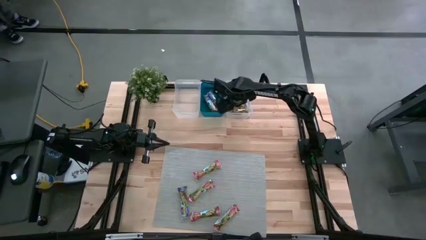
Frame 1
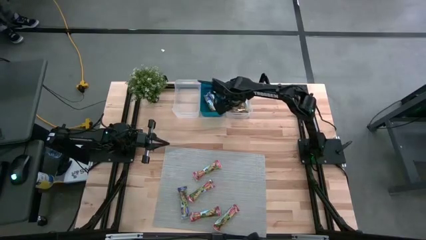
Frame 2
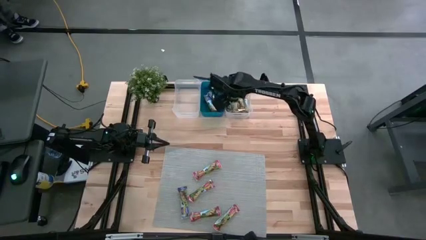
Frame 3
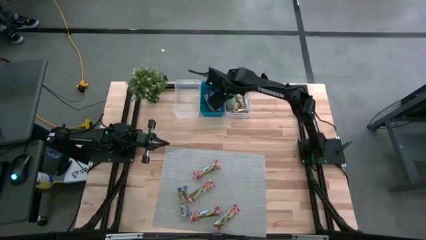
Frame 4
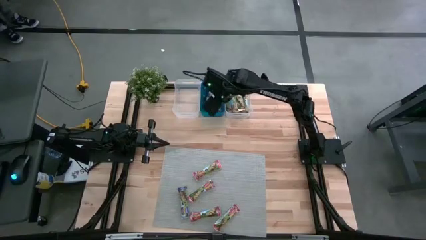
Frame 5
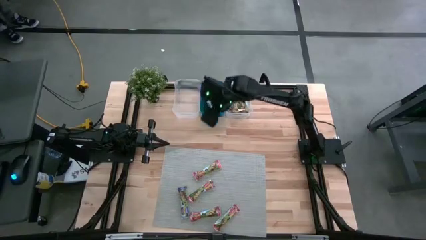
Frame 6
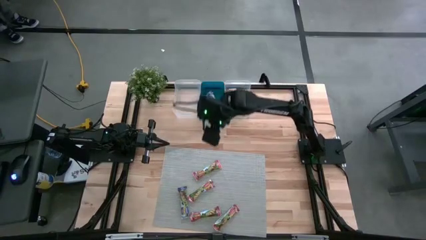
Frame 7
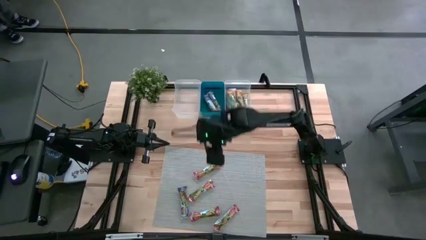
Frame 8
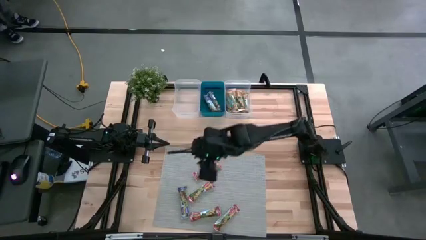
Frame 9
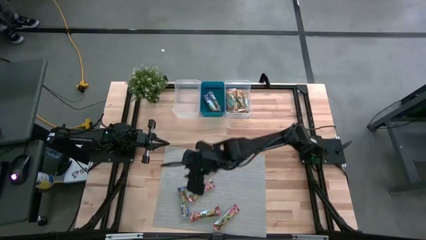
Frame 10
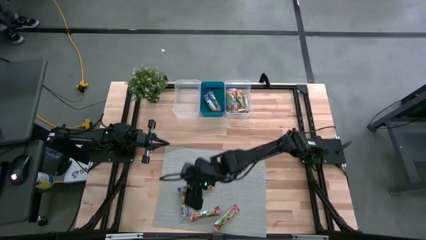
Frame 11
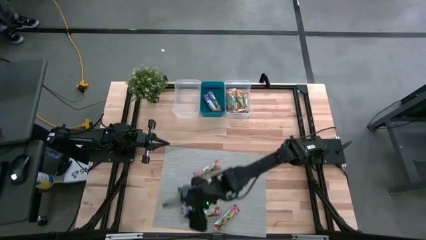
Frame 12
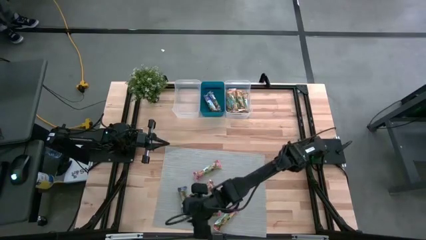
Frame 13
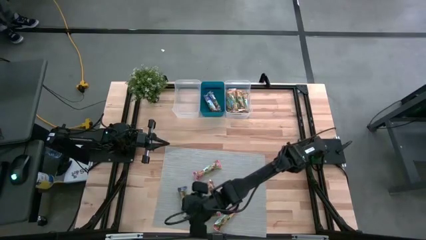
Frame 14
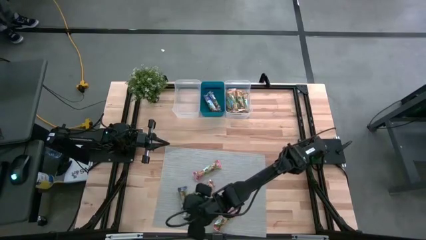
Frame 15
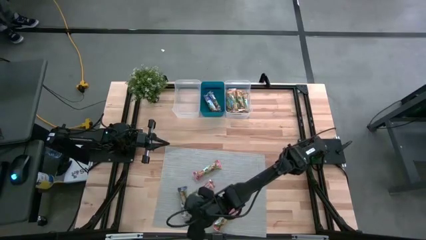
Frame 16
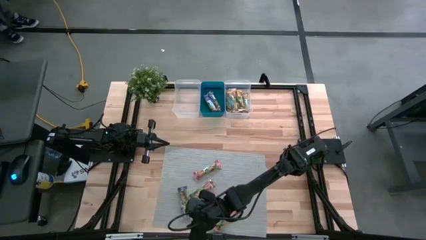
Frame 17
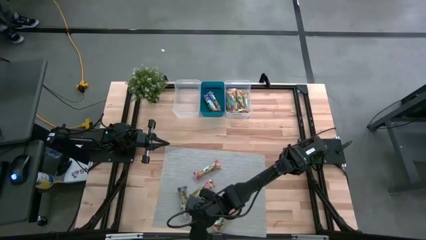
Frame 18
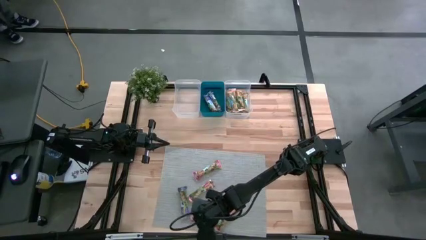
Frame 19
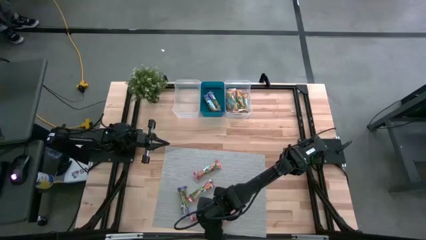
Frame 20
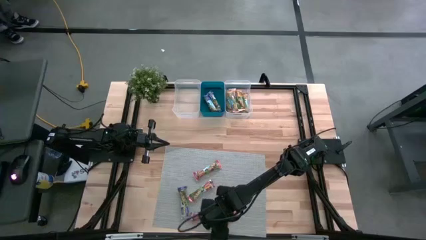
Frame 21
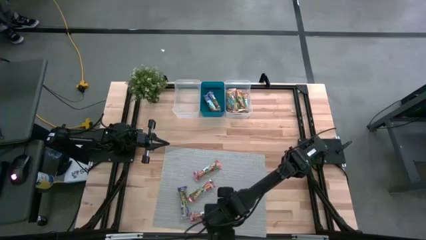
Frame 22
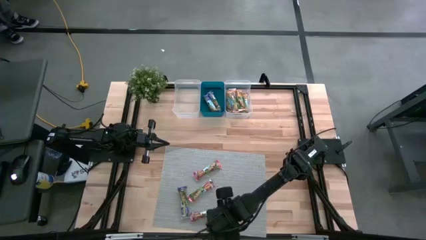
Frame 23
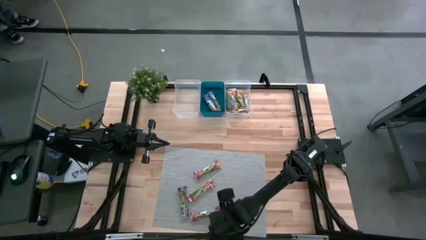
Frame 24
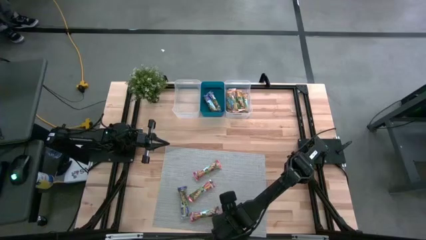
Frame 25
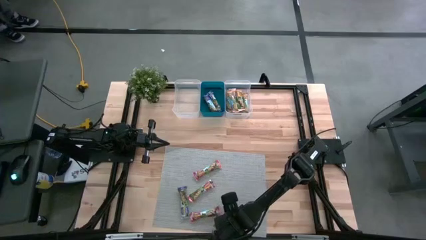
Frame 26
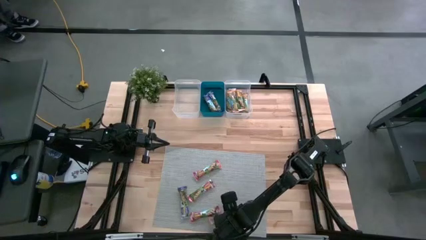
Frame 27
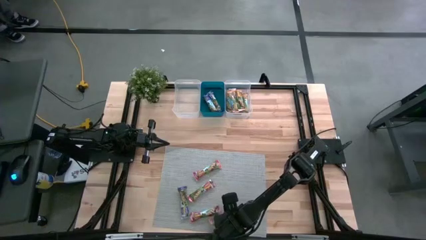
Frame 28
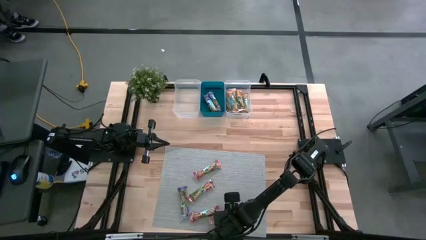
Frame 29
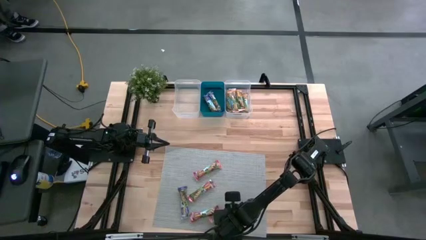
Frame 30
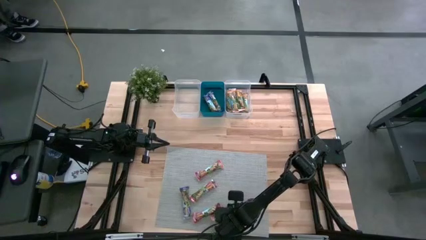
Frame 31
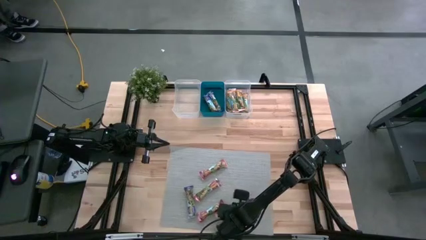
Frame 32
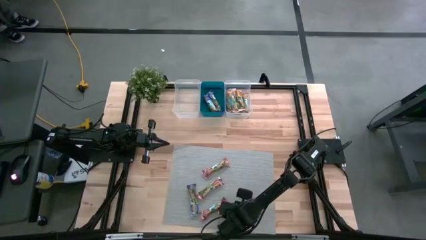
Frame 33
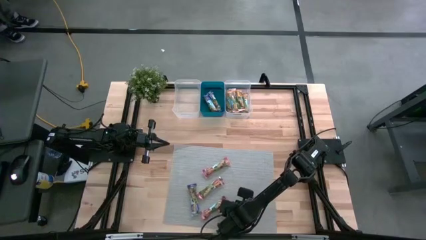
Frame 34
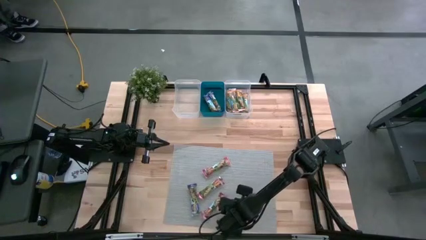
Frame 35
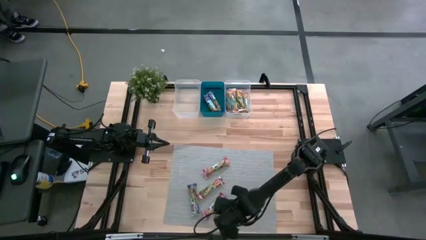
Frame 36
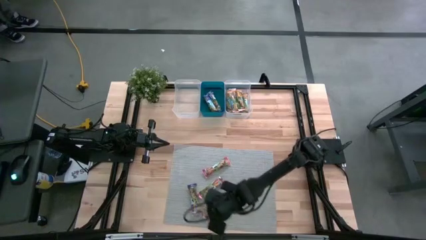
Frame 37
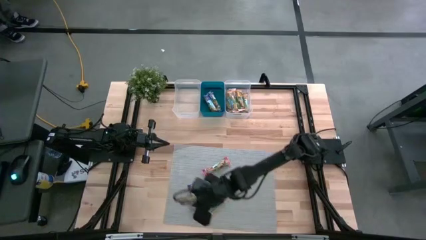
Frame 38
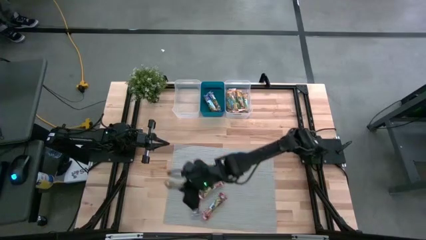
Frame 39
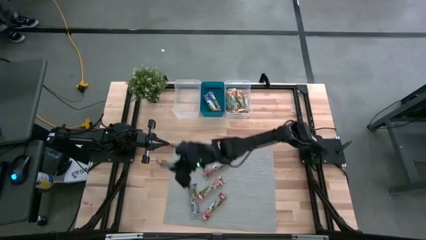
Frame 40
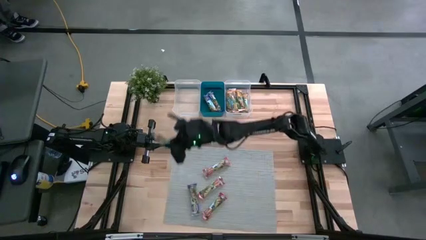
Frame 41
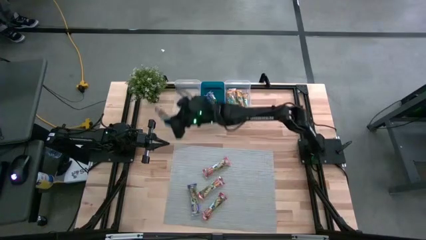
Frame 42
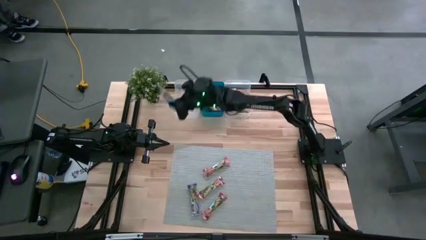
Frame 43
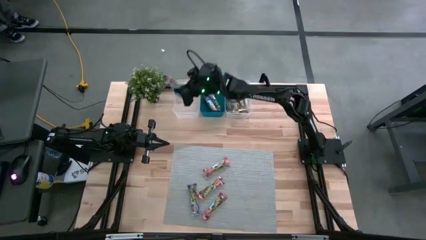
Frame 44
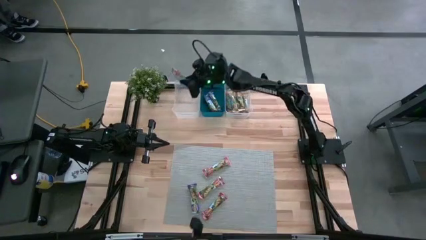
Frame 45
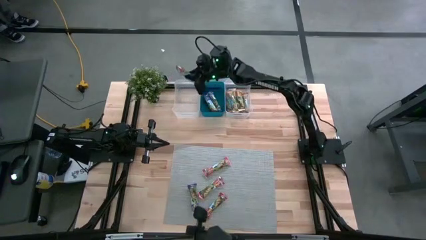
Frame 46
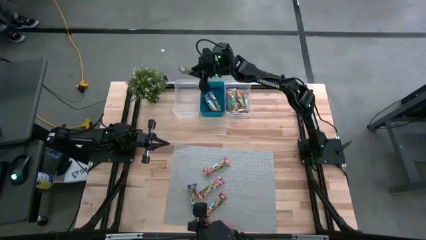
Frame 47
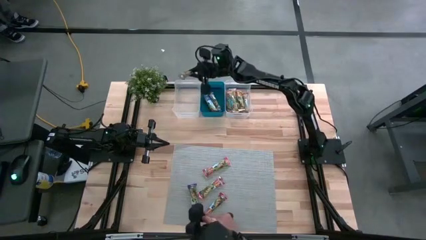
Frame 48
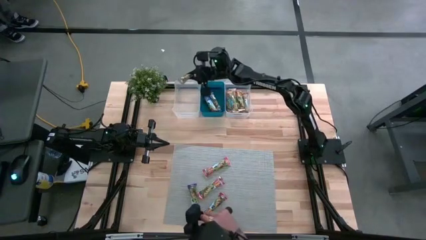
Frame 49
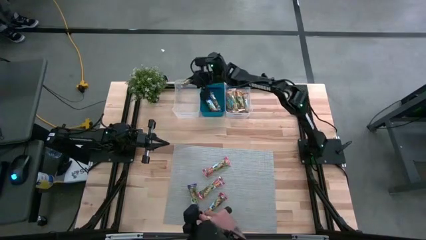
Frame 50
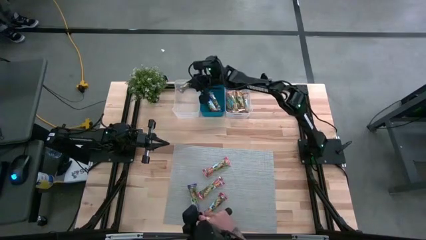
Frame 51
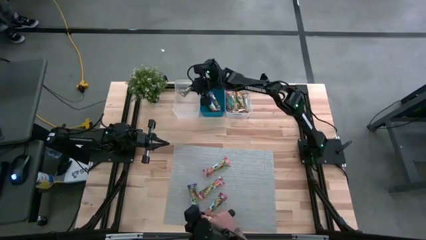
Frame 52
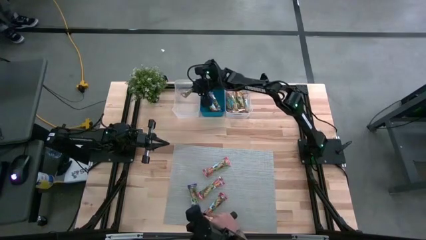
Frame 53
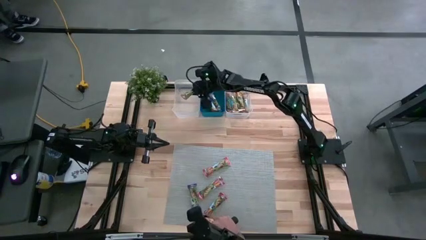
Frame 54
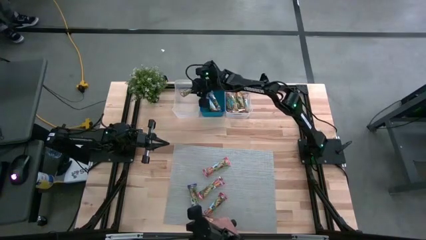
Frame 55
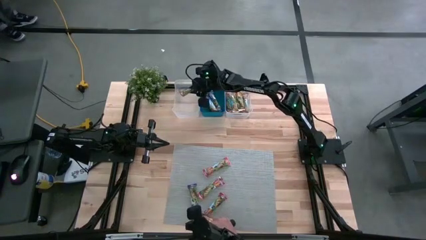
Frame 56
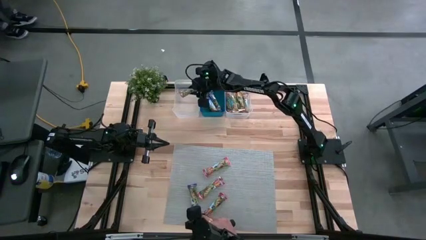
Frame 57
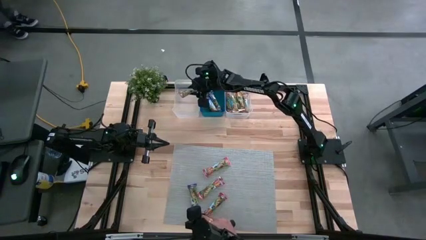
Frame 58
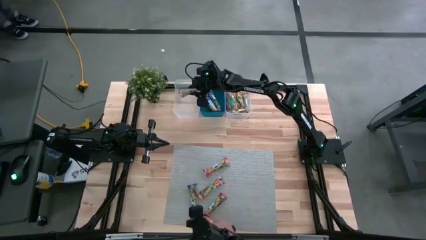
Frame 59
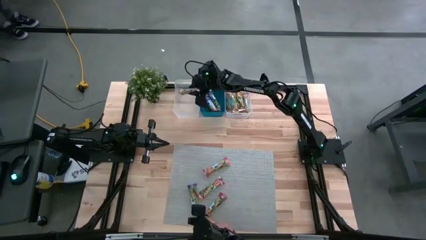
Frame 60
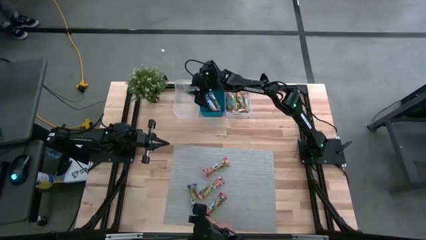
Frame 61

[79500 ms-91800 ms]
Task: Pick and place Granola Bars by type
Put the red granola bar into the left transparent bin

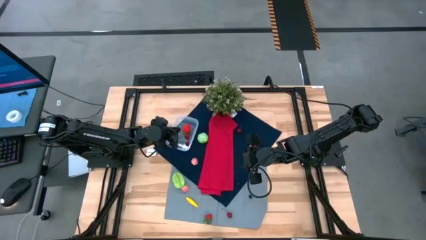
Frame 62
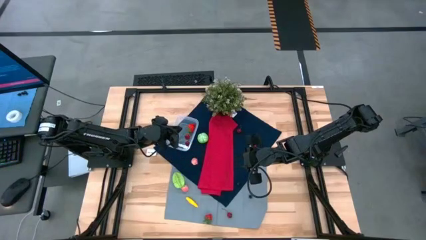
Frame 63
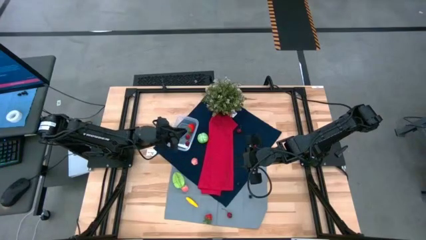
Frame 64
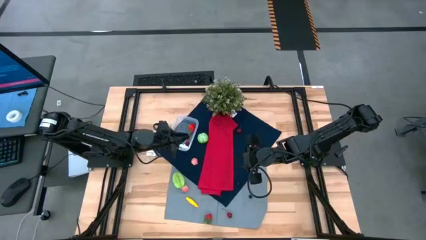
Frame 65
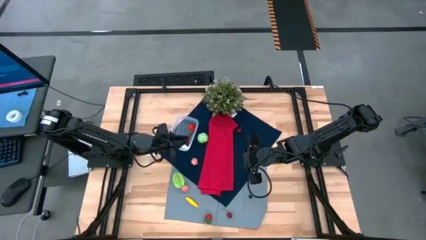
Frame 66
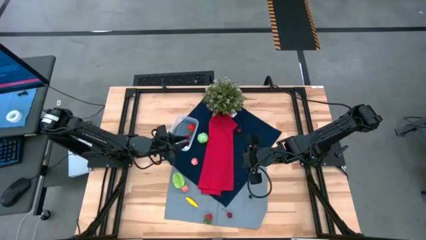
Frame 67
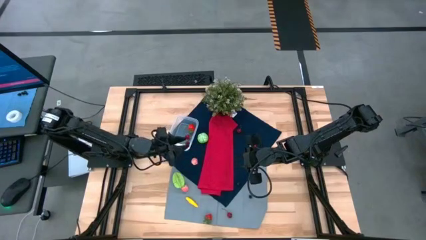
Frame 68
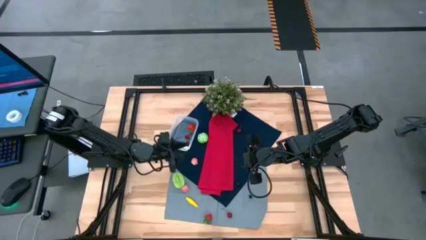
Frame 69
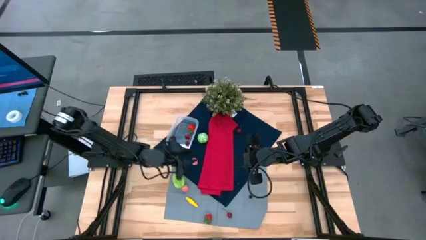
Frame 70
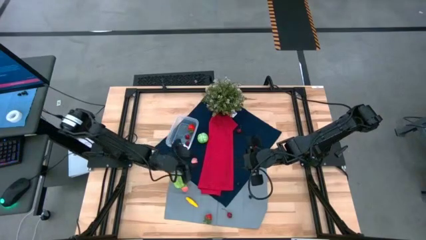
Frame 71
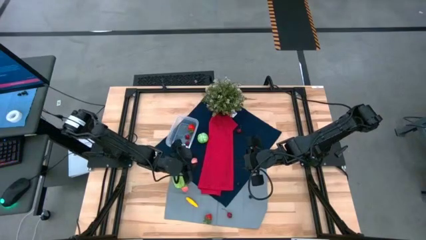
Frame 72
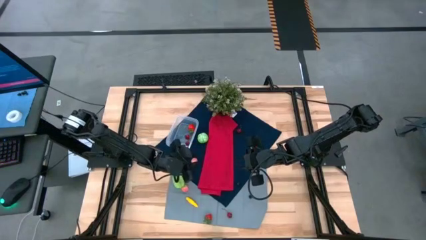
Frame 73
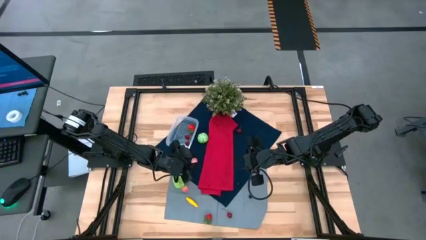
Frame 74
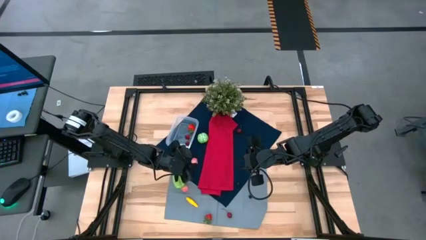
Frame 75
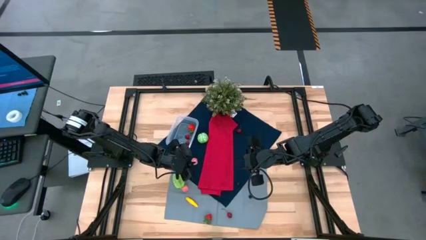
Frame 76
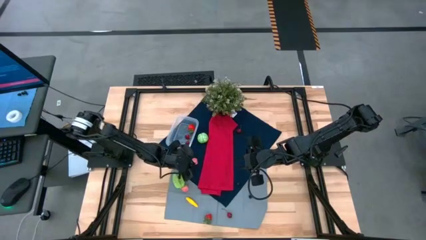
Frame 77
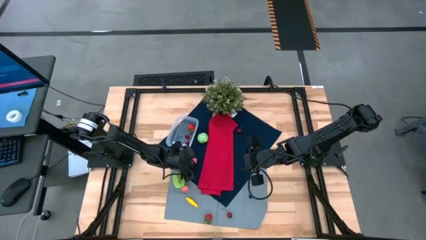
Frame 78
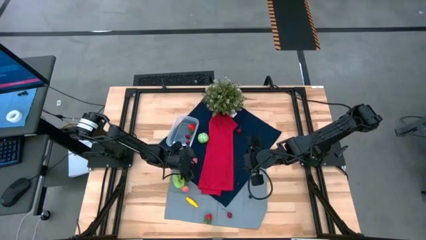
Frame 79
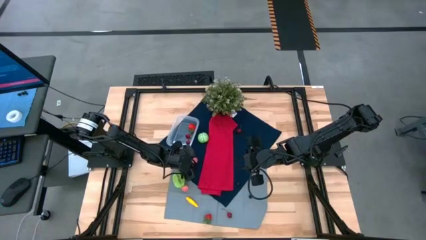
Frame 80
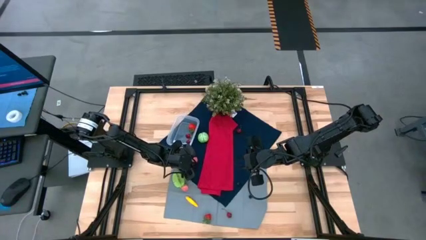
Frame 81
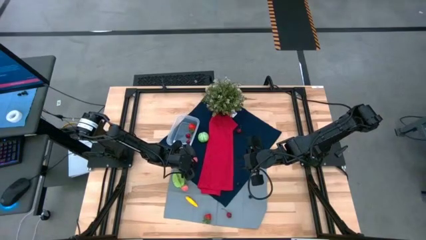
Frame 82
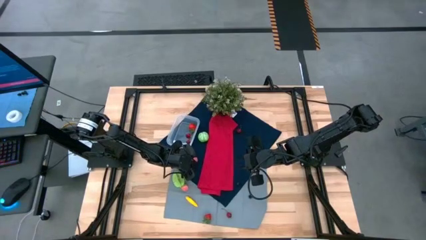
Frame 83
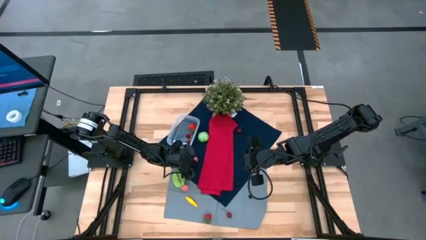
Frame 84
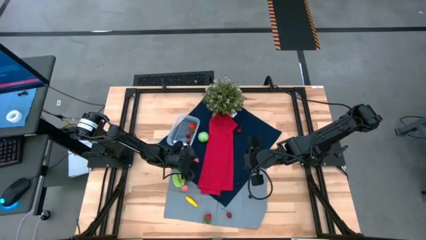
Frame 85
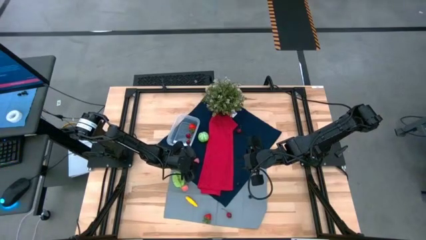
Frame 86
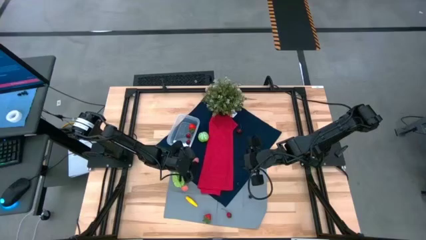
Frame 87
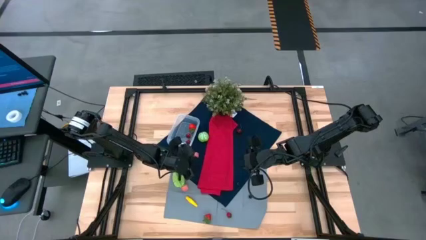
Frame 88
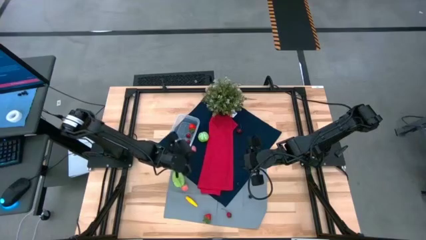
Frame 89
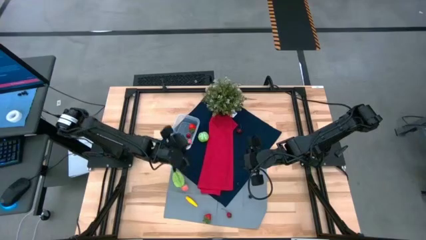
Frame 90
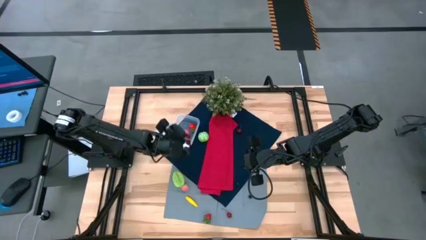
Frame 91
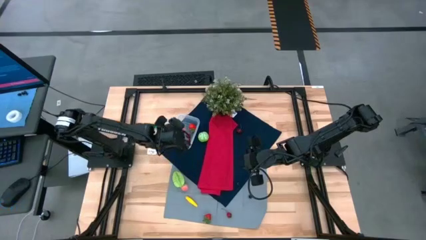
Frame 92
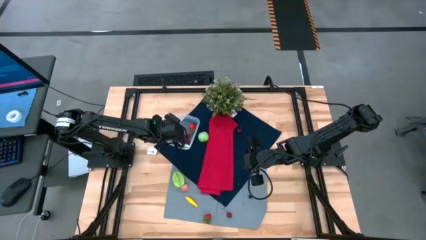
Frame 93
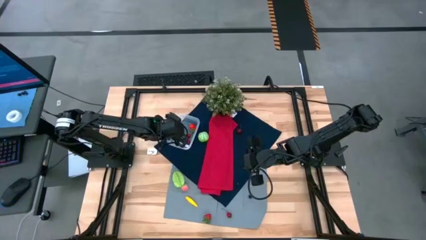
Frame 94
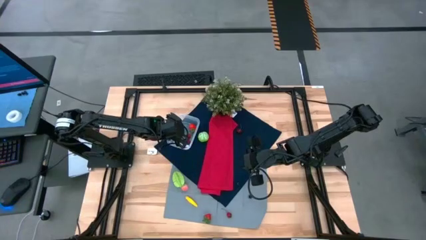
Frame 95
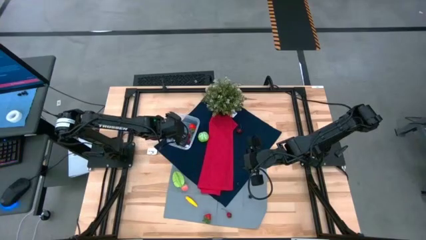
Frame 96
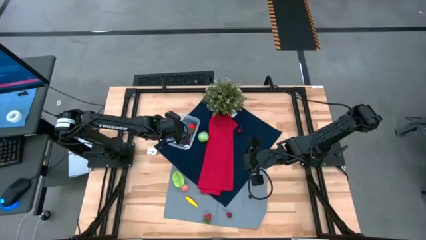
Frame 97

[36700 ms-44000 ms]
Task: Pick and placing Produce into tupperware
Put the top pink peach into the transparent bin
